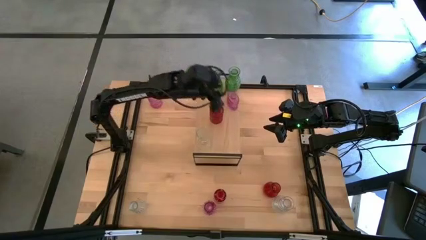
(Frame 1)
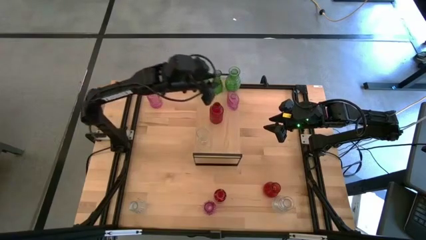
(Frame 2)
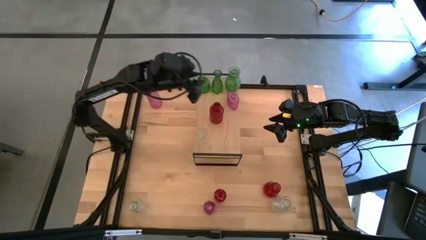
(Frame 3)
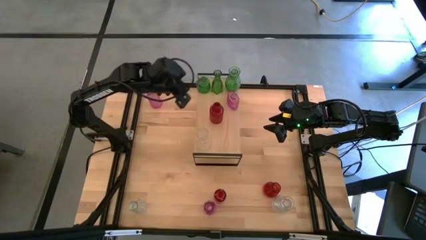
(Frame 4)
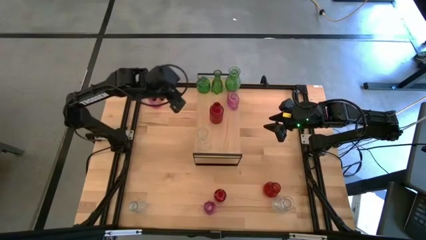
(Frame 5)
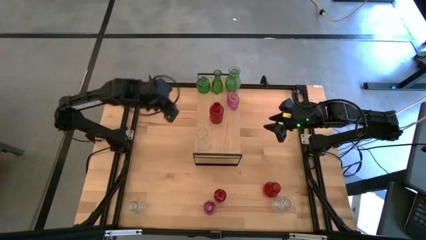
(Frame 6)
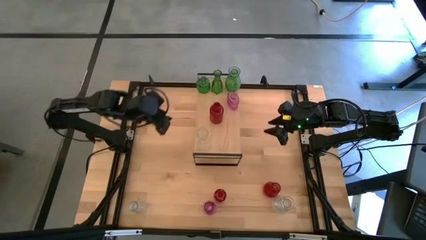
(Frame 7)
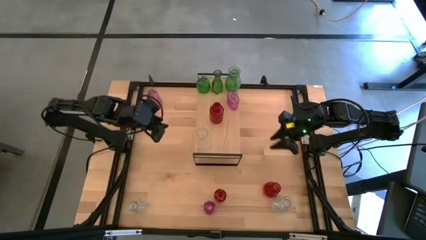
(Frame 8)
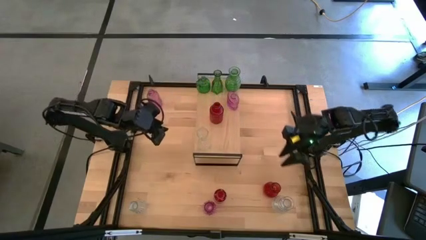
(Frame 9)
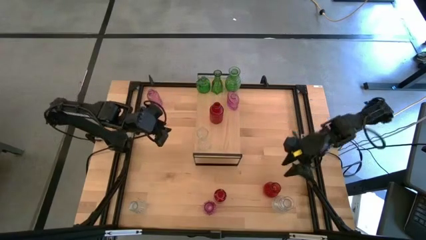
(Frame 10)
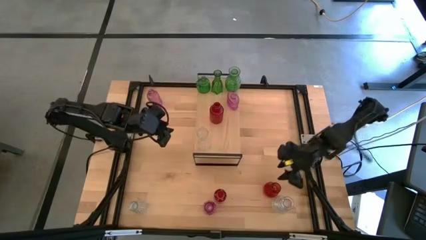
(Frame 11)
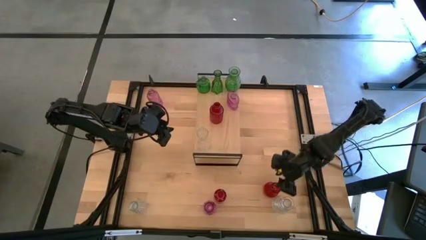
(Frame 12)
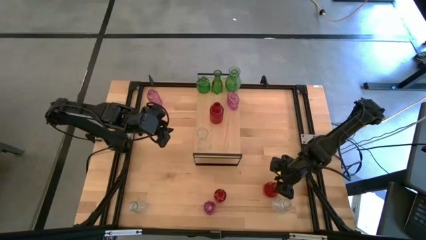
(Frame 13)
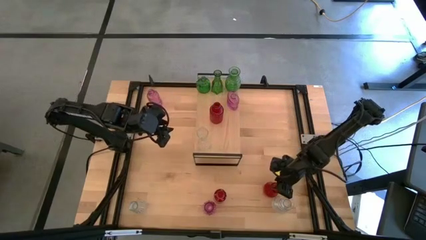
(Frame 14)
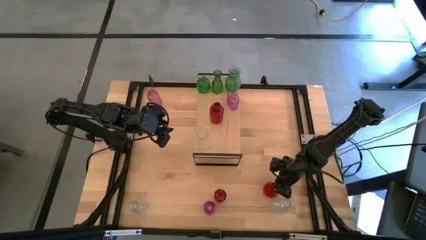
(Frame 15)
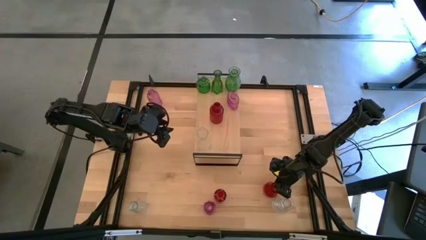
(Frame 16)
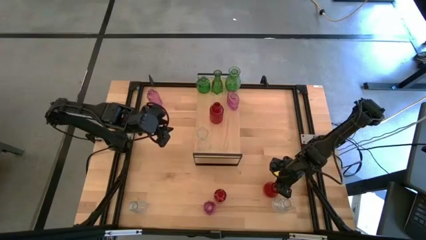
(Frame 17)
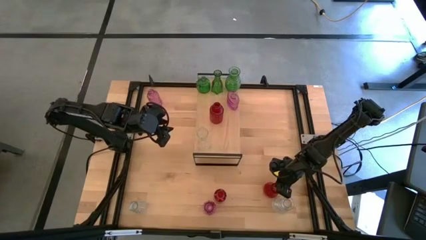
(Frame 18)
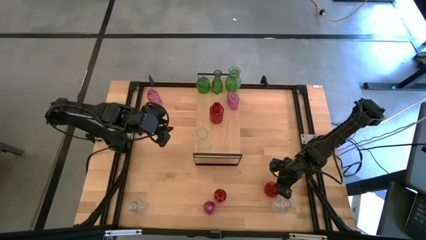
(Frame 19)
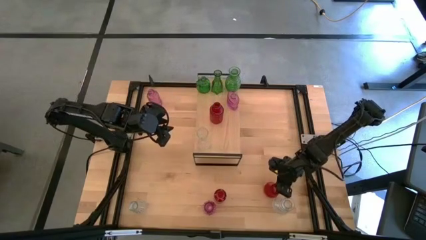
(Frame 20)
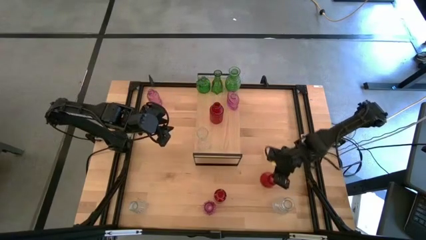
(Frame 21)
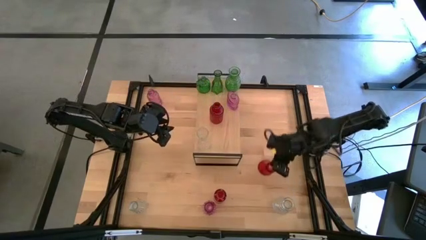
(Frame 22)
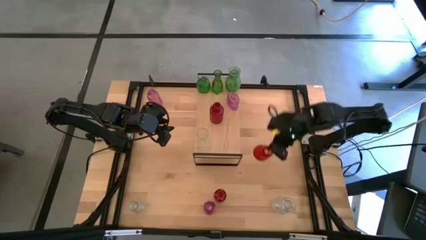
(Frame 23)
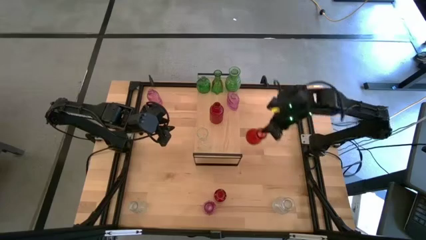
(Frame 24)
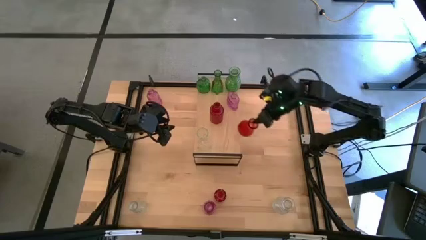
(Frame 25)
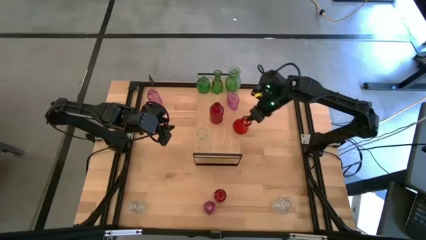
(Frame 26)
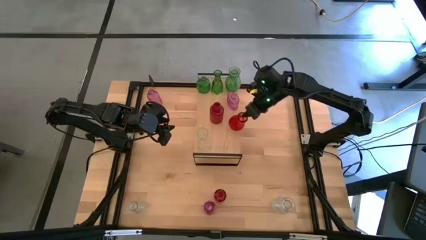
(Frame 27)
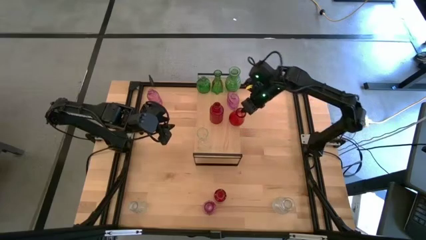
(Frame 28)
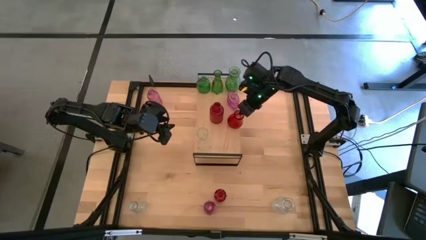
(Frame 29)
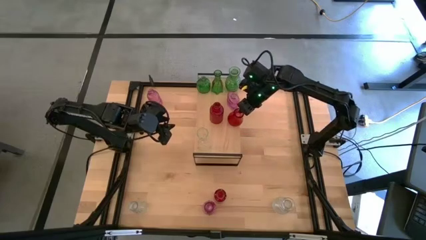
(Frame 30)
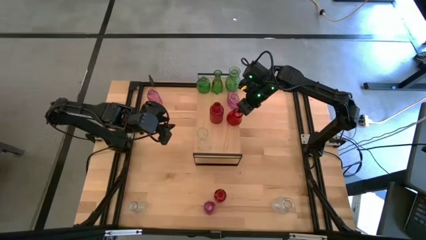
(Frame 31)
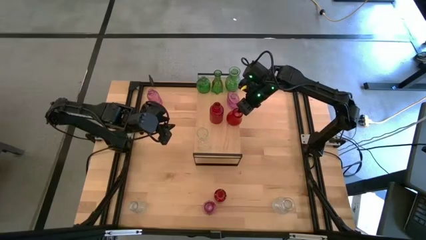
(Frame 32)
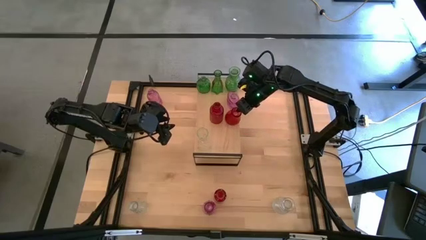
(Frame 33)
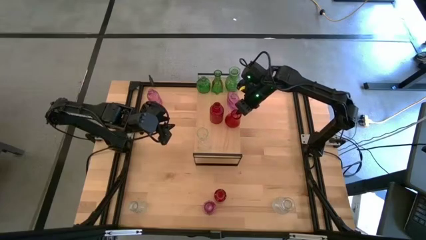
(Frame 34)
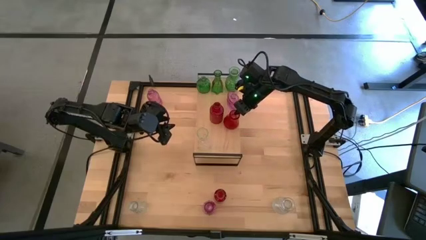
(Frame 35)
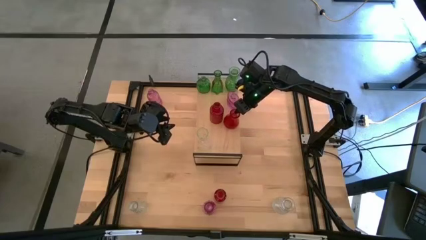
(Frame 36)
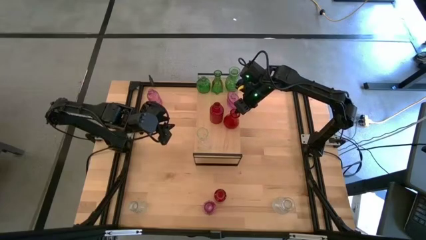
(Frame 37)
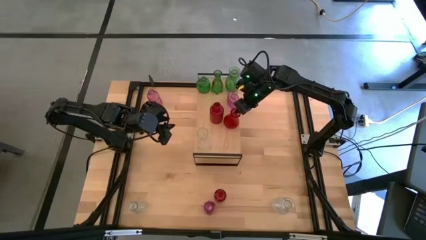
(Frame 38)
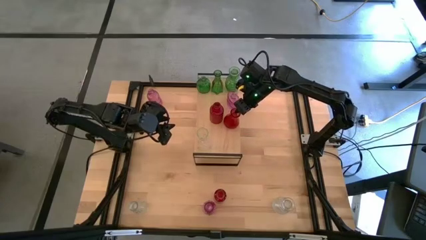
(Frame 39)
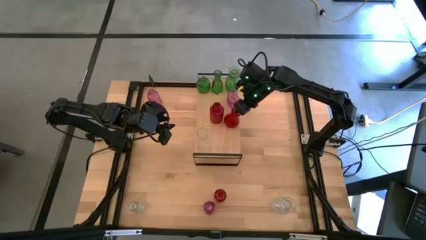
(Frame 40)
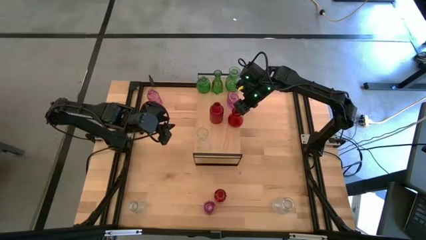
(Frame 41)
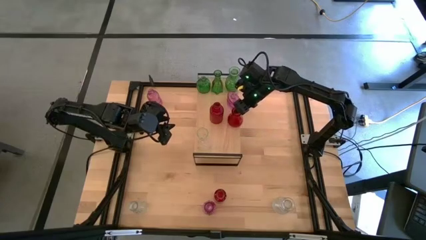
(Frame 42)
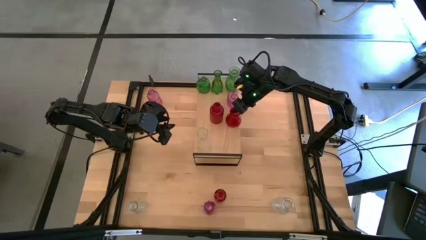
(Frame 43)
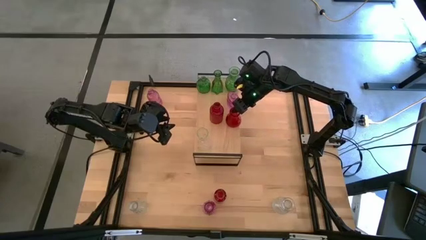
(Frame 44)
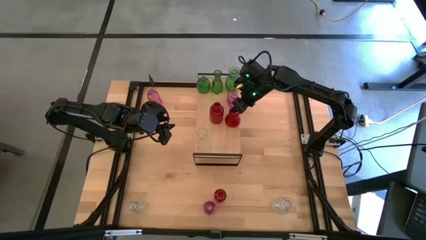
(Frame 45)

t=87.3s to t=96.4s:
Task: sort vases onto shelf
Put the right red vase on the shelf aligned with the other red vase

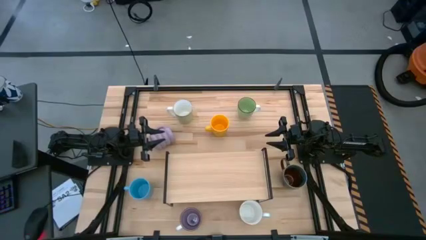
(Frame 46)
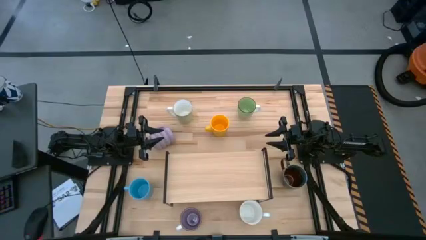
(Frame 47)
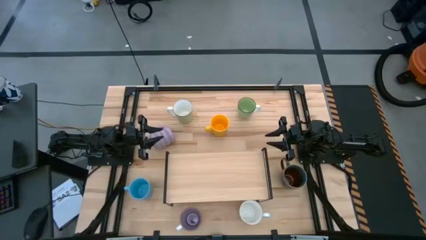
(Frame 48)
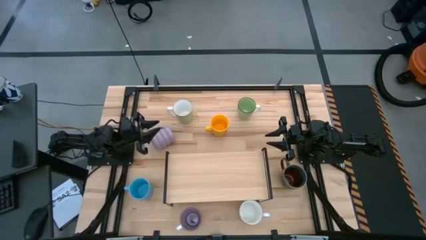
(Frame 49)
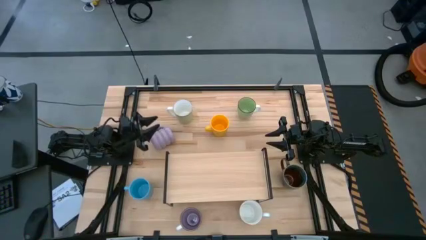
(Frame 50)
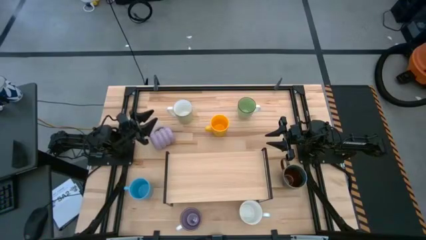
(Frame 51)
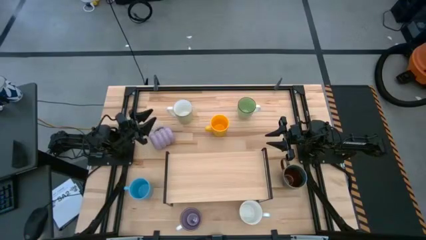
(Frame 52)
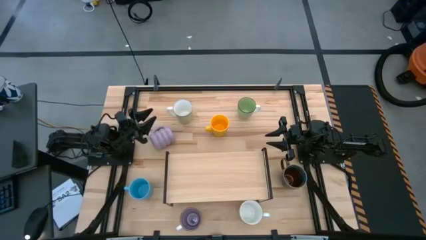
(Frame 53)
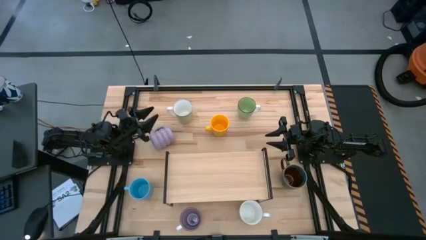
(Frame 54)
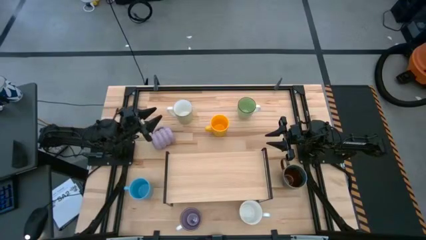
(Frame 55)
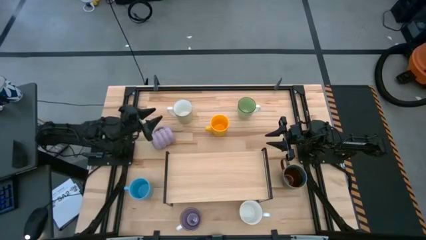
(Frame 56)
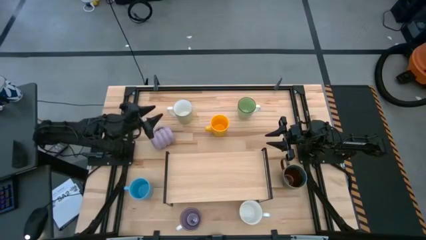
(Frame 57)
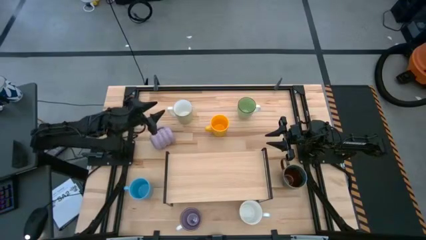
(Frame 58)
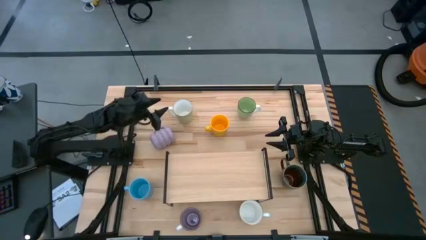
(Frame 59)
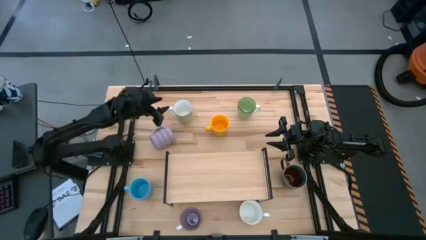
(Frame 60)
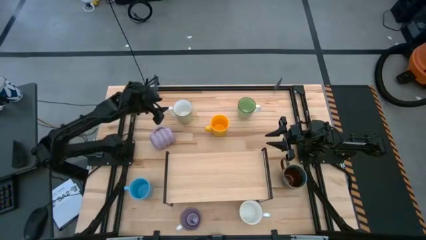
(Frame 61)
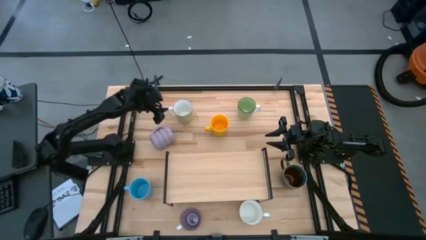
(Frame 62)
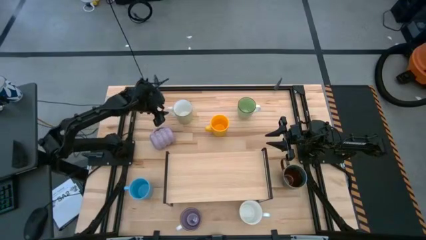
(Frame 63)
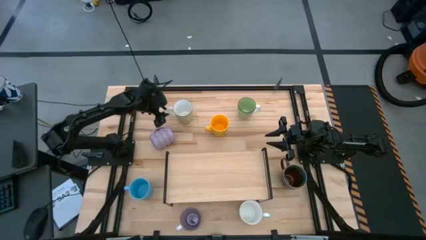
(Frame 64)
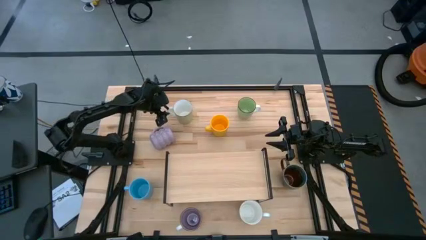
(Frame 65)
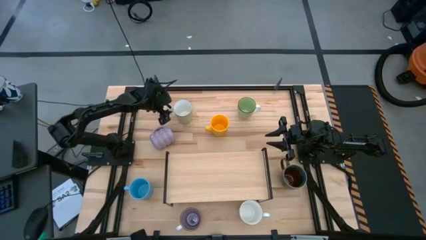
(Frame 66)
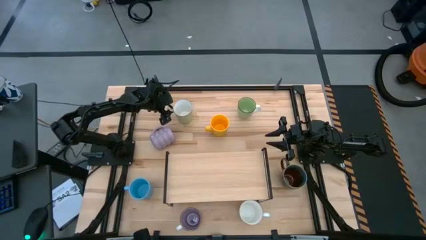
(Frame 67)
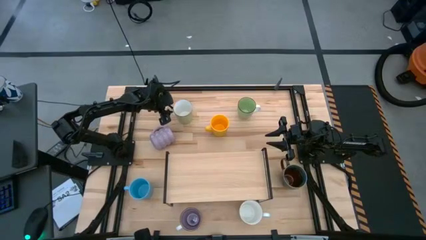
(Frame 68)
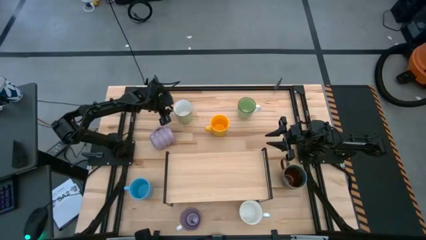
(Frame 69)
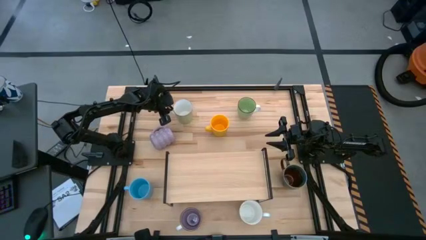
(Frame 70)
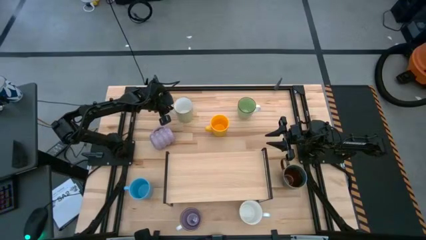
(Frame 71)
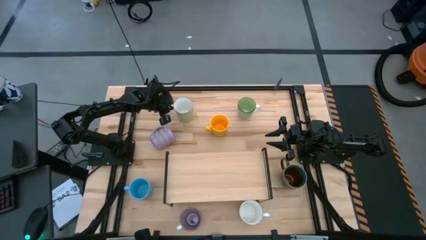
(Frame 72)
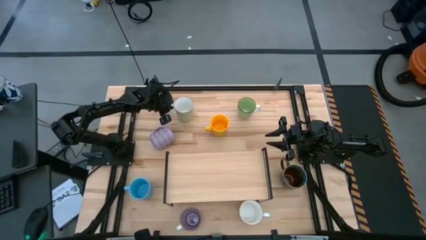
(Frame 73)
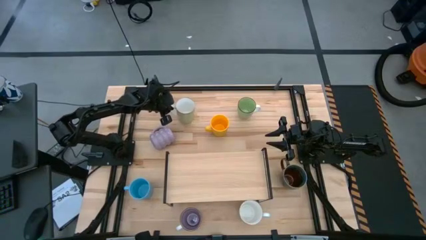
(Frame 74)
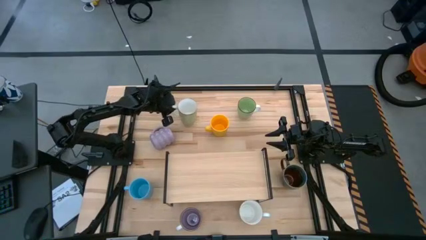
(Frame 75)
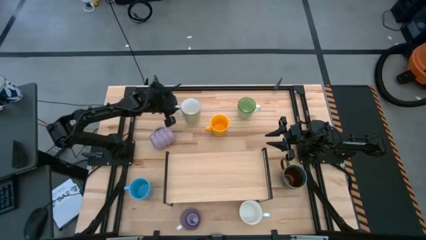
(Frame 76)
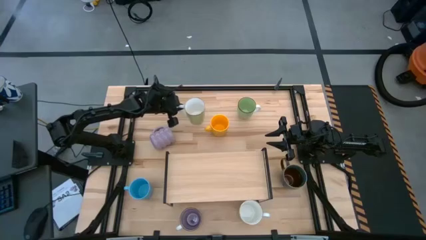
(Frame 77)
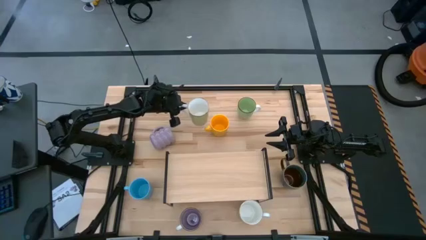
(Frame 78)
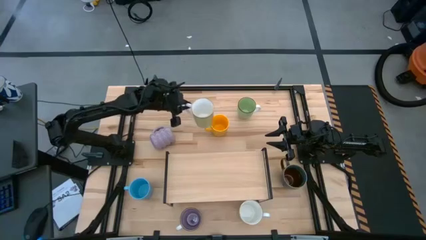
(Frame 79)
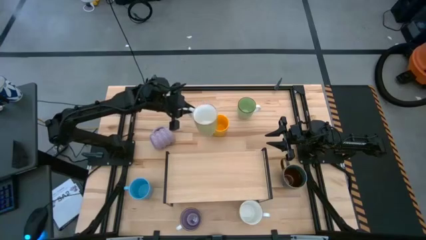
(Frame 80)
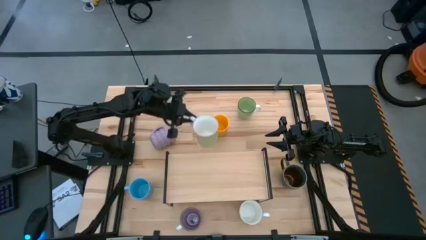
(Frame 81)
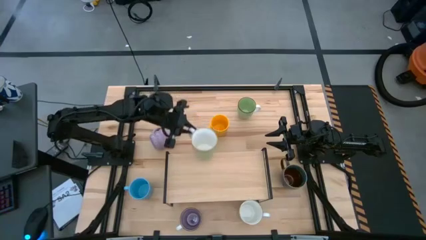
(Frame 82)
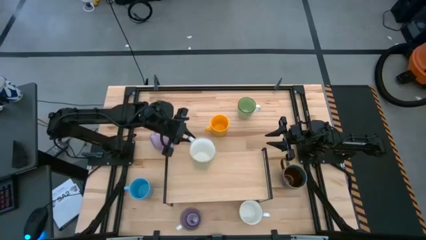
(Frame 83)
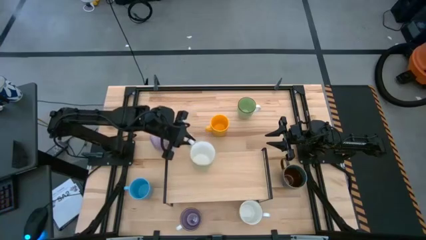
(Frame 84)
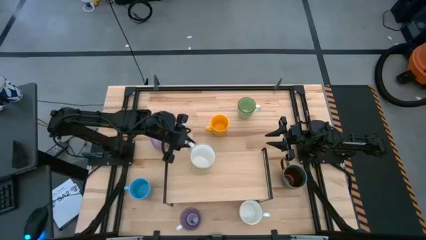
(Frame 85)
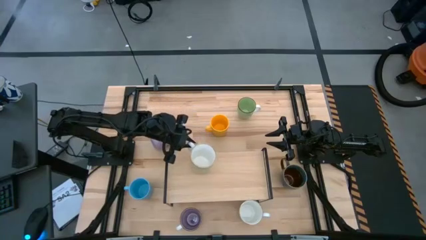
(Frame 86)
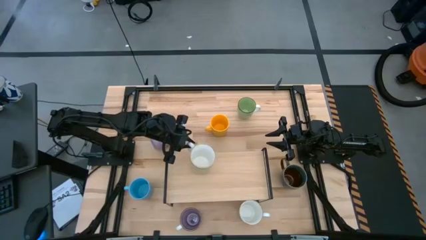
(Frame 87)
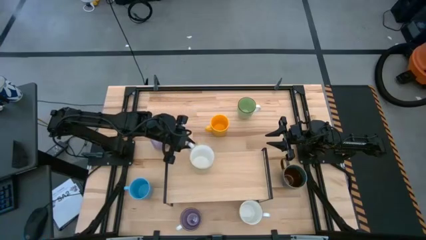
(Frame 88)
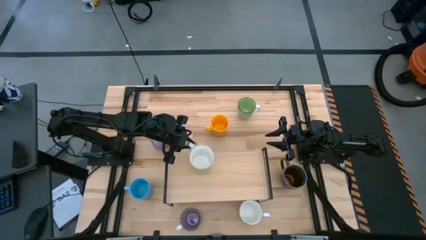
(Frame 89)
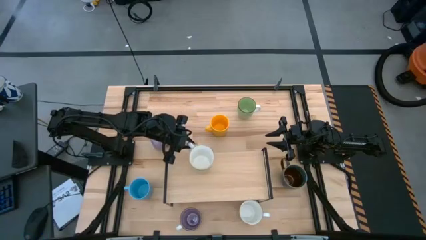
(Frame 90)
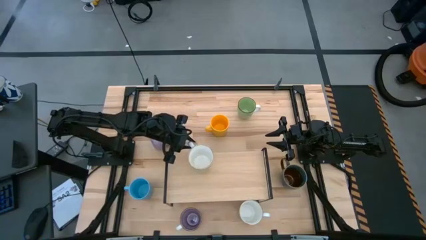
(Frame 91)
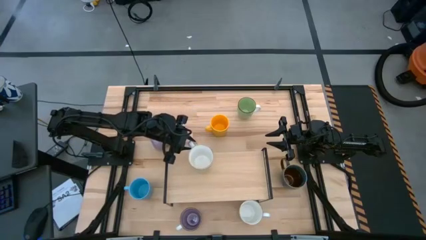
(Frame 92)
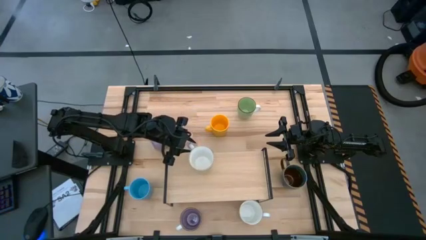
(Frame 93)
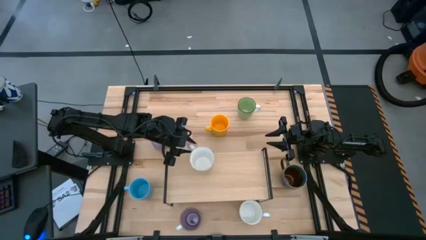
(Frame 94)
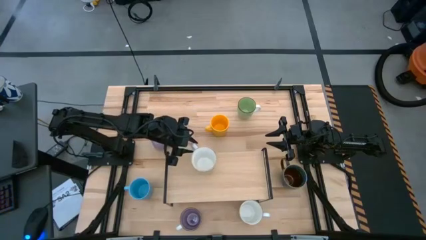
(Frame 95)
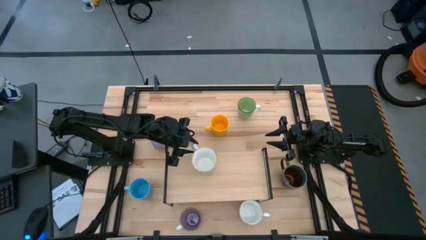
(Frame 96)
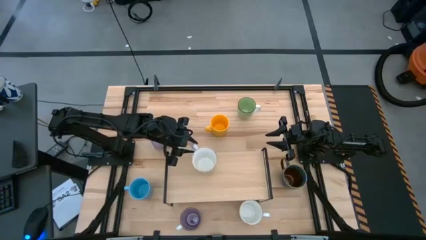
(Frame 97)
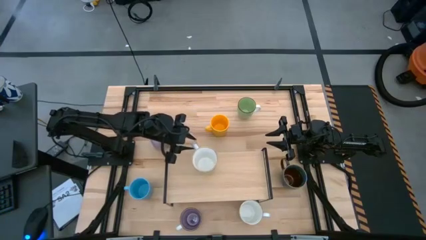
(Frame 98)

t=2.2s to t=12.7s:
Task: Place coffee mugs
Put the white green mug on the shelf
